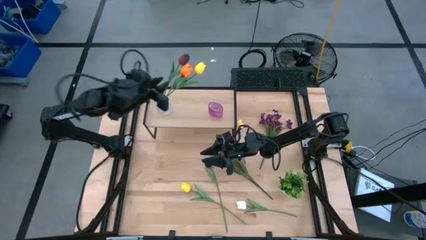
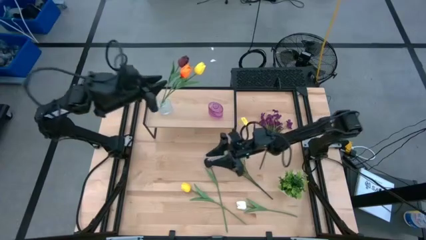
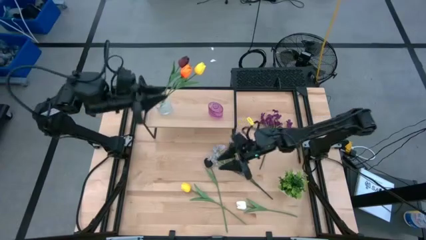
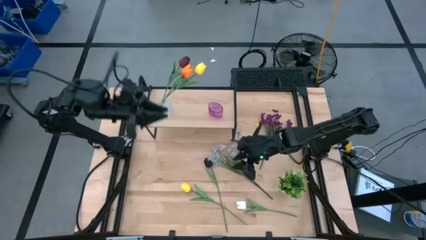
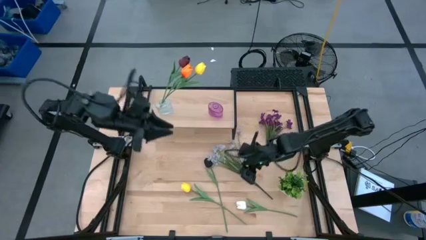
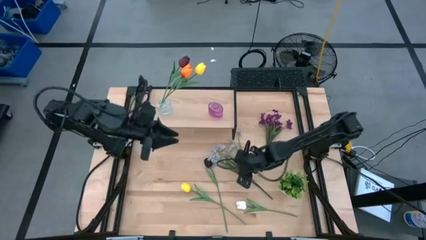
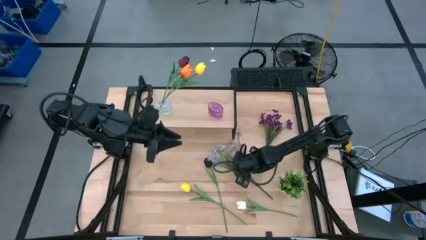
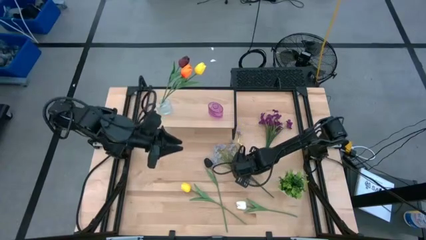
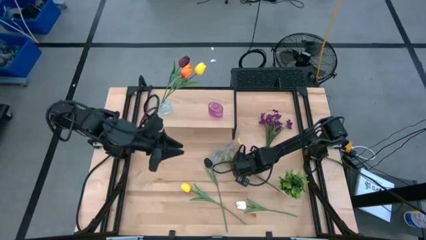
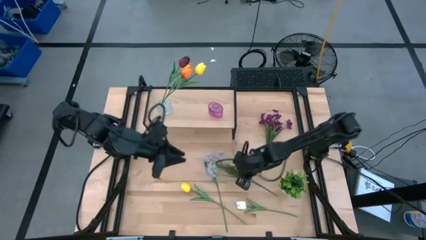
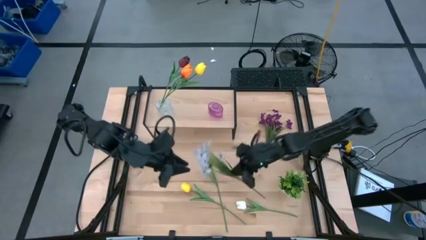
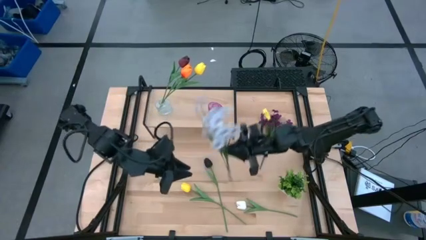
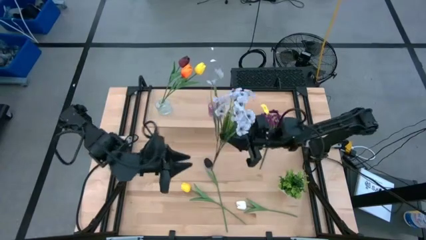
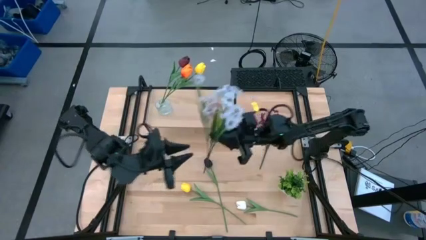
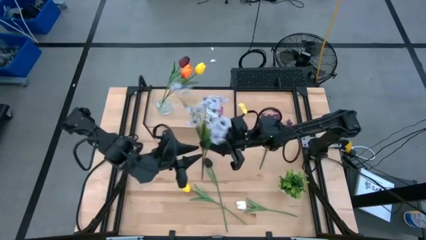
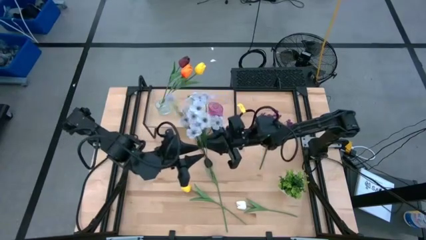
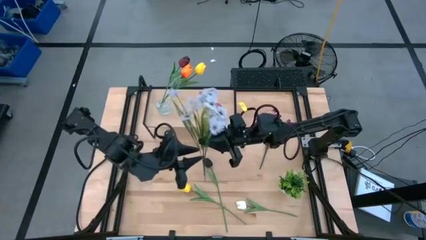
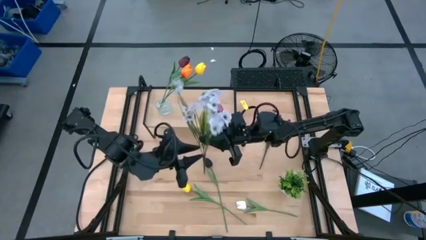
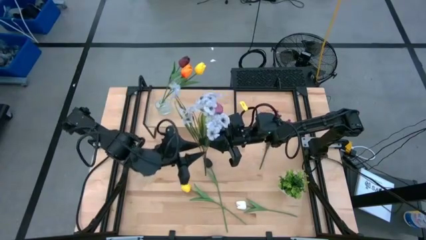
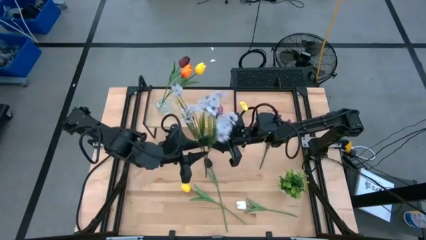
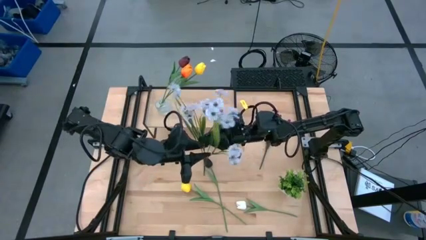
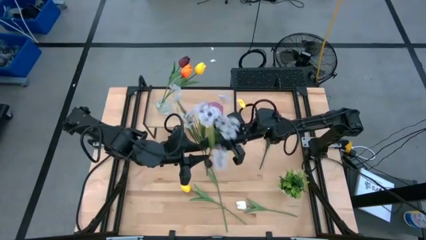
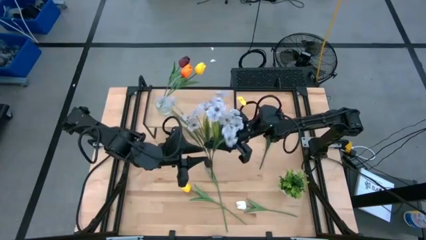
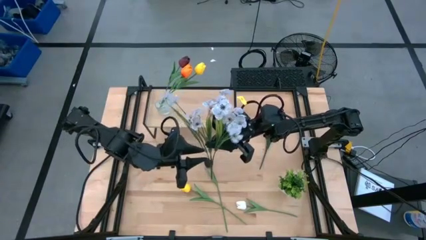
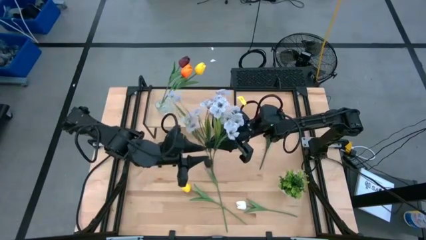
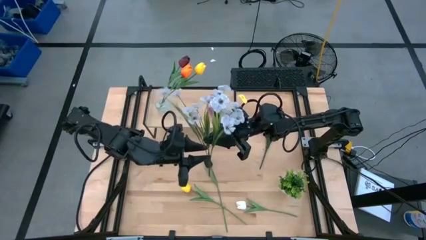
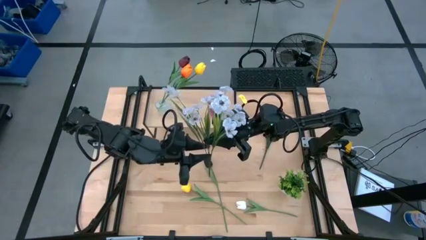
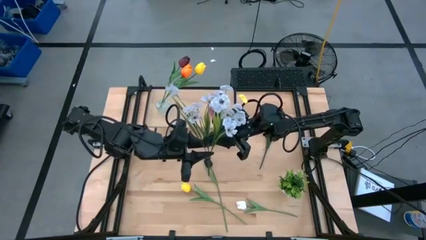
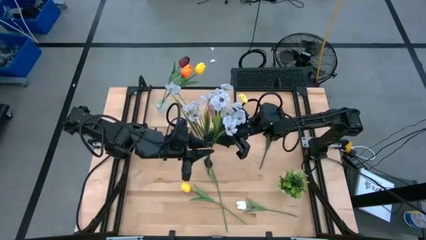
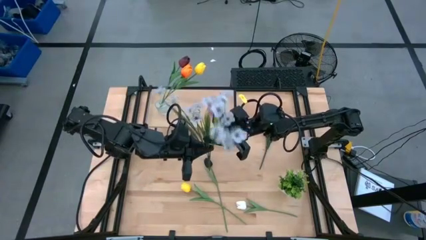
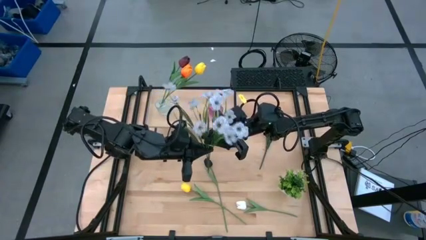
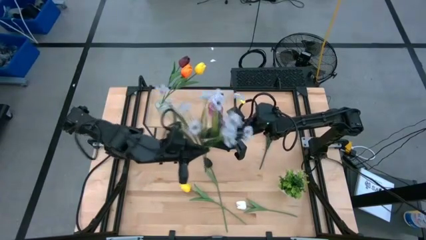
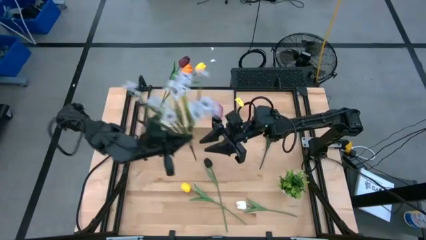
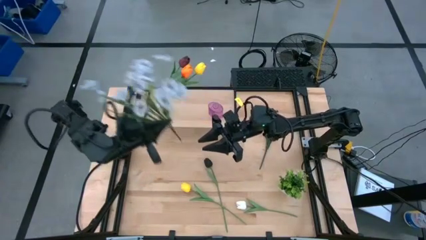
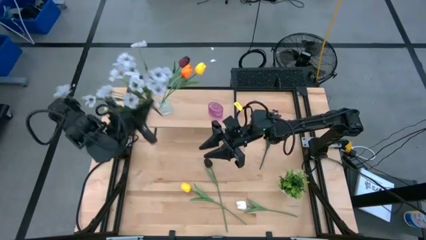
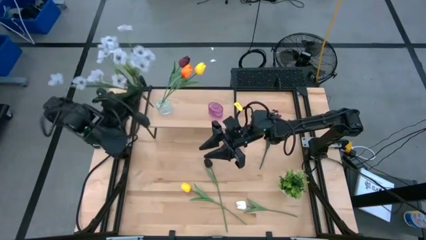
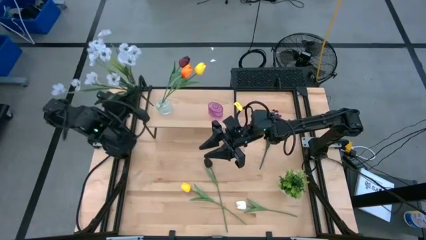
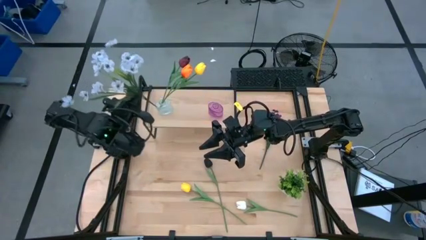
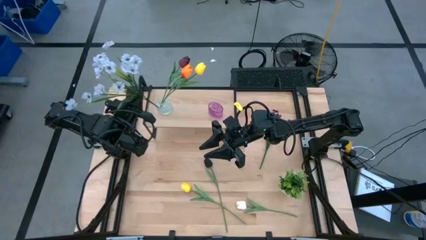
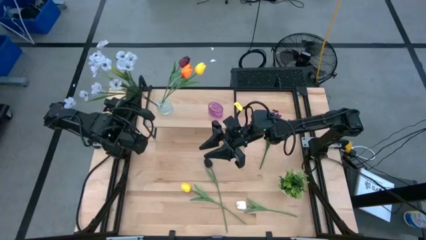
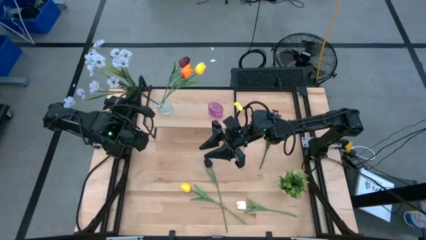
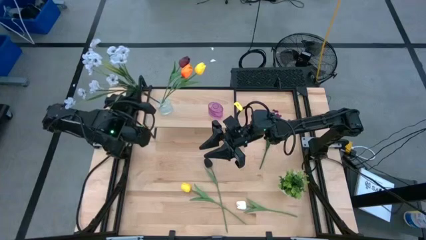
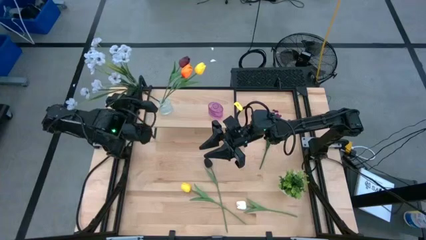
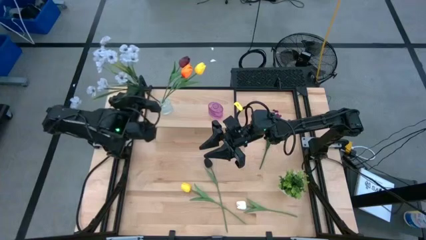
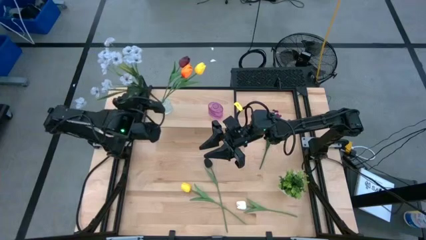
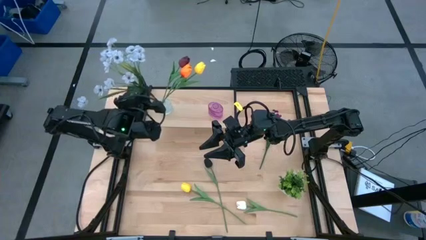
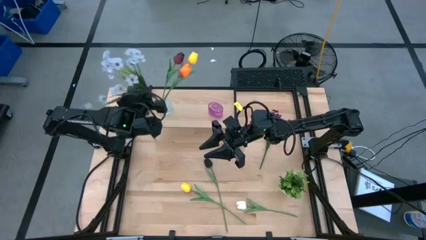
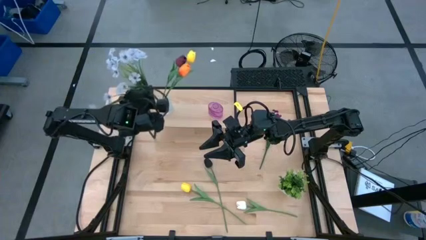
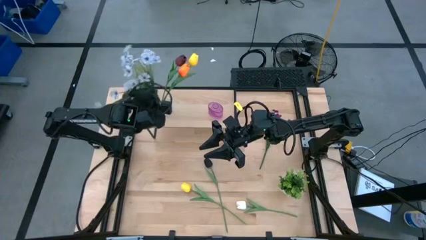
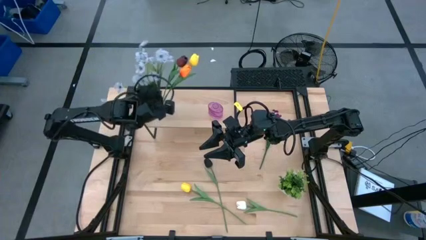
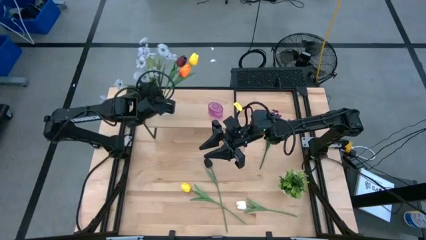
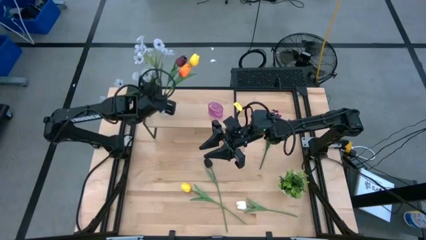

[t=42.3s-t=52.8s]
Task: Pick and place flowers into a vace then onto a shelf
Put the white flowers into the transparent vase on the shelf
